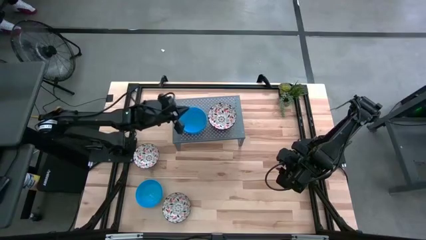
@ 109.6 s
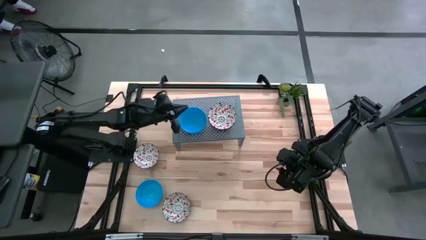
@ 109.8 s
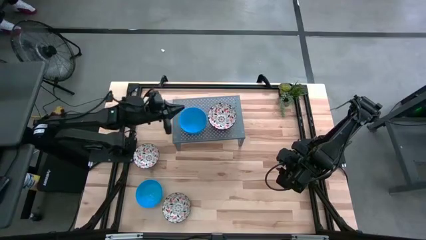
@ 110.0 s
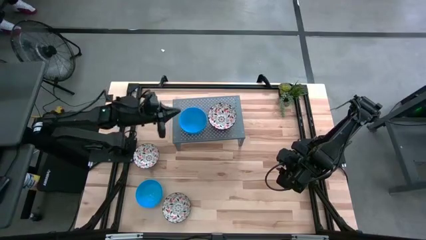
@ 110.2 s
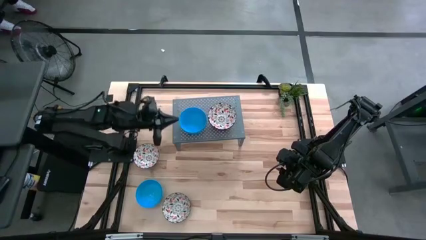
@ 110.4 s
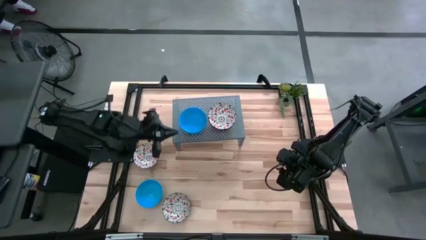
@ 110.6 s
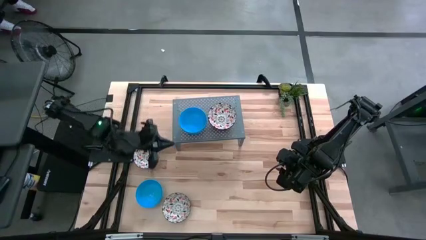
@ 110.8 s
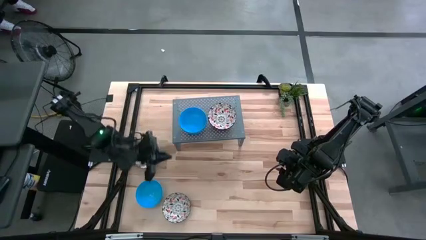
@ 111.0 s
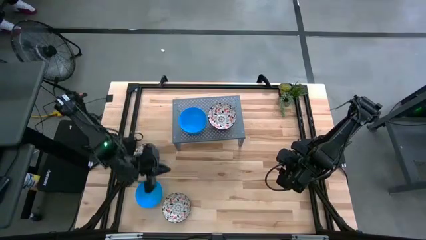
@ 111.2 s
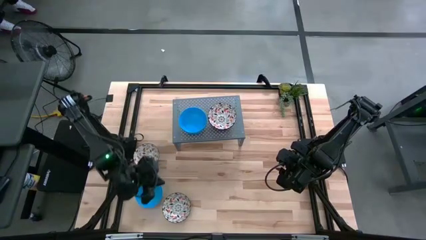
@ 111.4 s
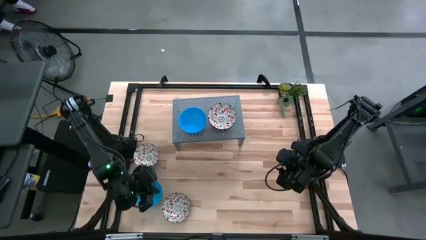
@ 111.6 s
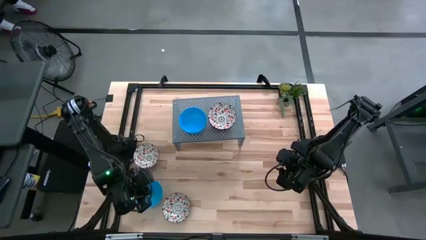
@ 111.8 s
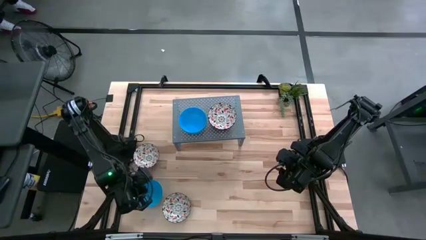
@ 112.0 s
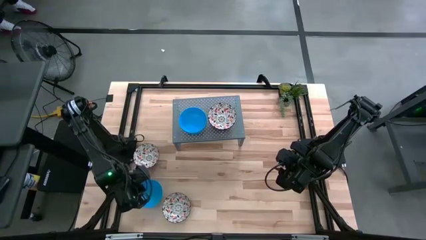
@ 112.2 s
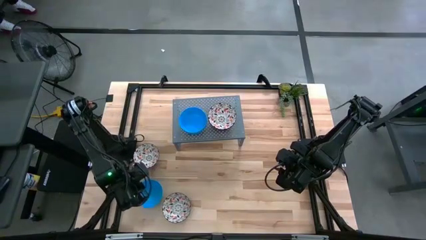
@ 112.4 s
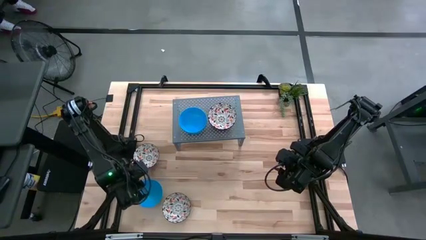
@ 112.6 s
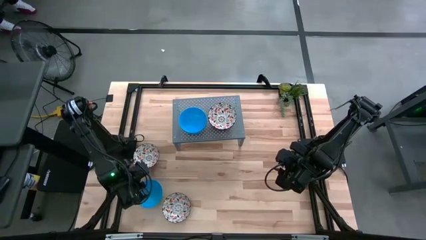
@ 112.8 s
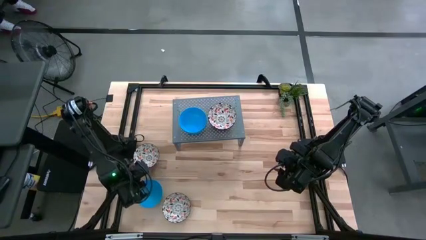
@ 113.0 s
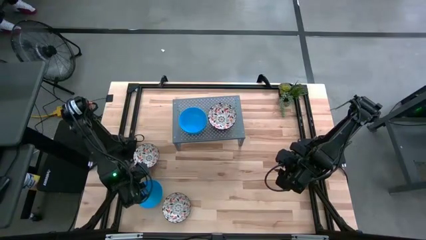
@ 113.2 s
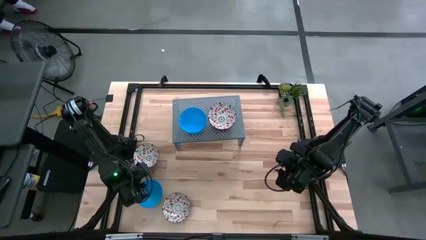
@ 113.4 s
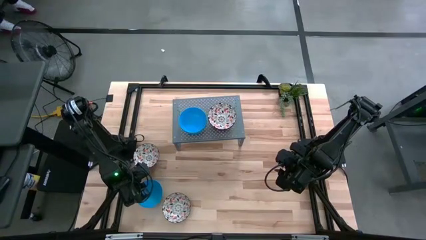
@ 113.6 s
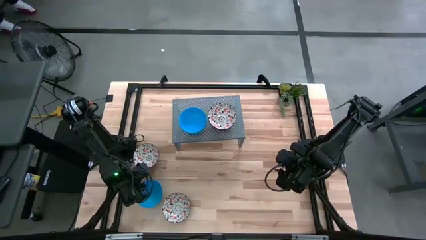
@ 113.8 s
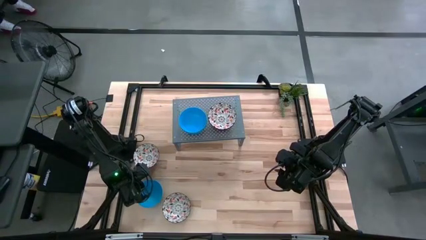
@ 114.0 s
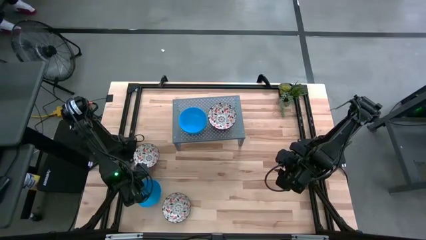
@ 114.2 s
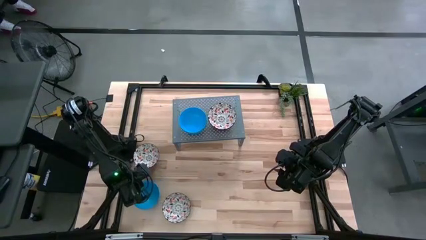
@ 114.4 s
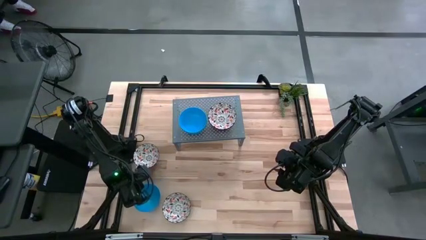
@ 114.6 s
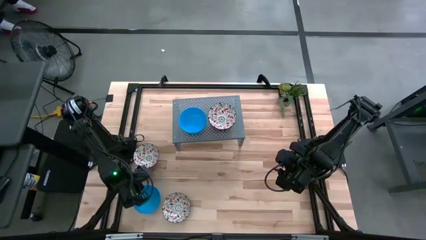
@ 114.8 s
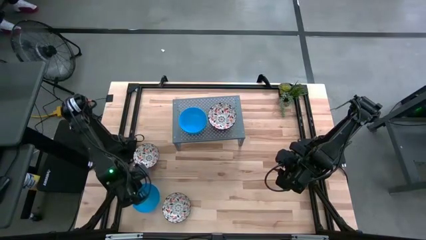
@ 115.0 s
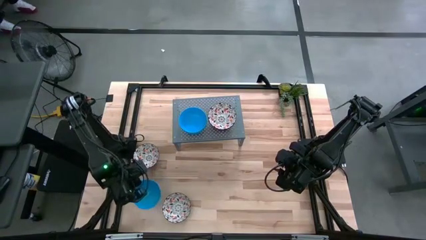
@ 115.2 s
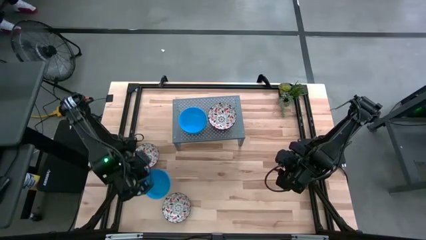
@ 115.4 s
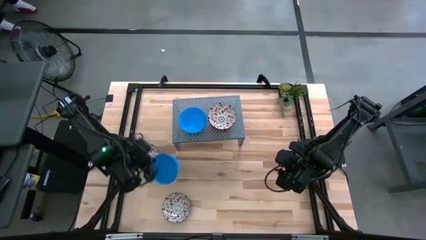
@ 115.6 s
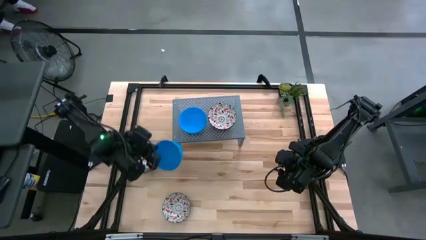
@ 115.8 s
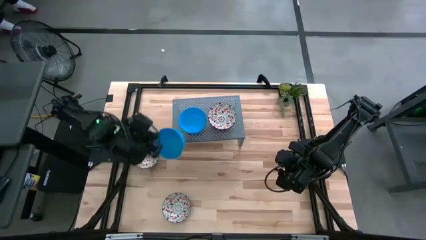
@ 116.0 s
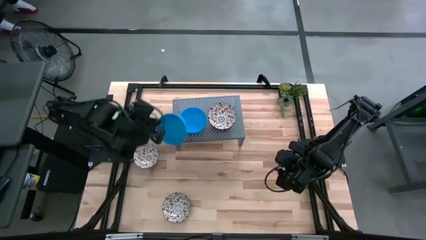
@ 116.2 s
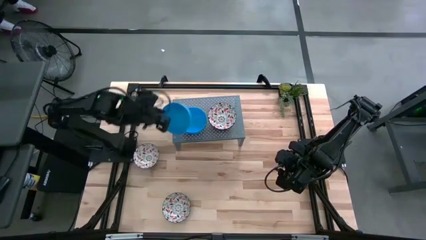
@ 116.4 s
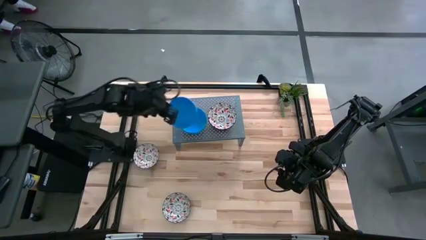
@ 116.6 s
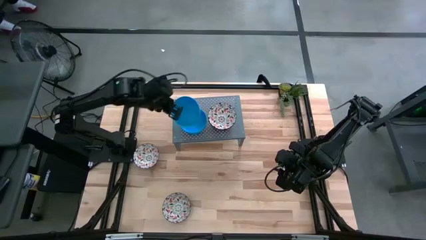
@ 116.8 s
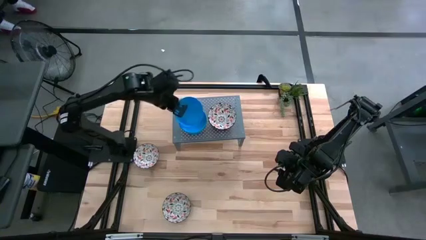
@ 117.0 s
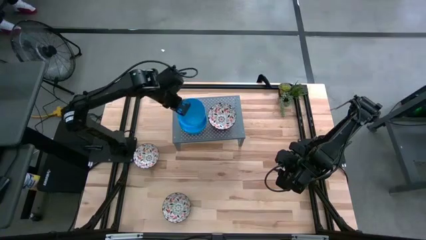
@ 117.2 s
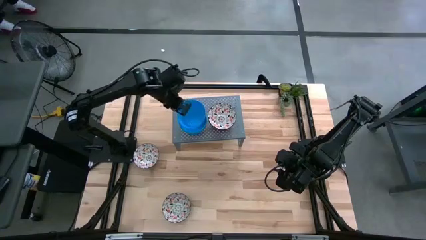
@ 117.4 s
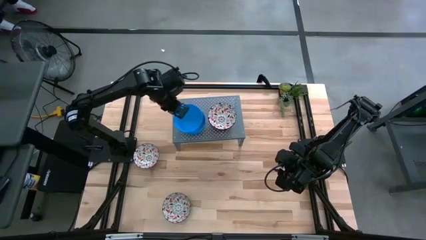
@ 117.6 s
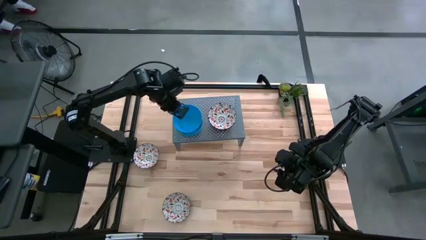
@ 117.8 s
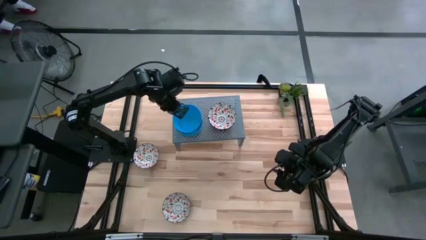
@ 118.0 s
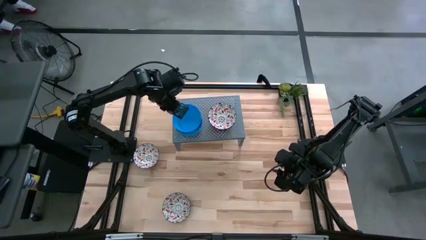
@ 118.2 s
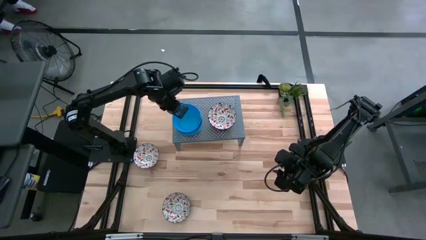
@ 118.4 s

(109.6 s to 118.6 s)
Task: Pick & Place Mini bowls
Stack the blue bowl on top of the blue bowls on the shelf

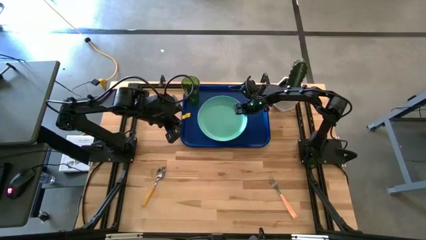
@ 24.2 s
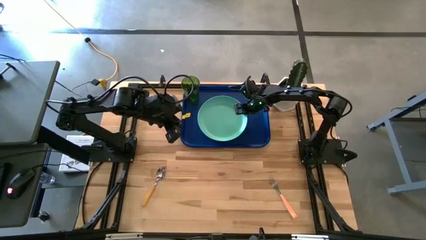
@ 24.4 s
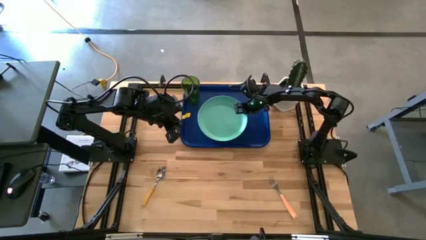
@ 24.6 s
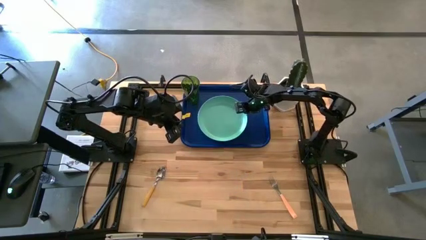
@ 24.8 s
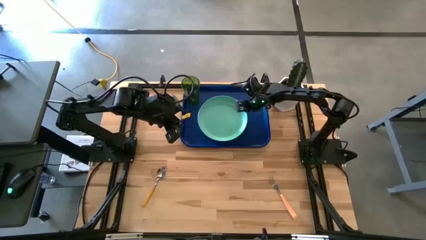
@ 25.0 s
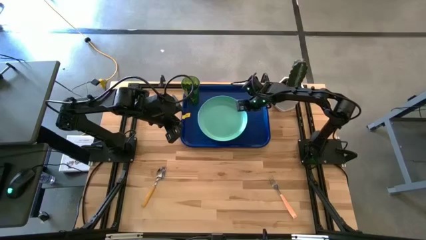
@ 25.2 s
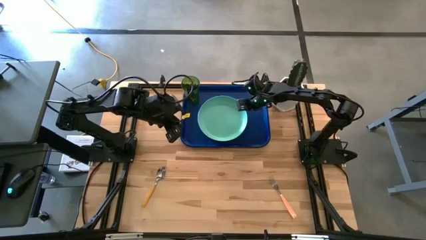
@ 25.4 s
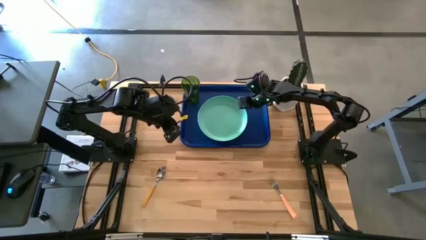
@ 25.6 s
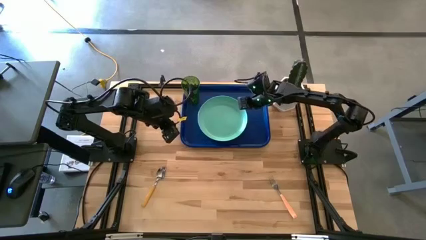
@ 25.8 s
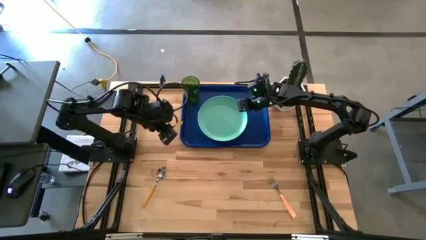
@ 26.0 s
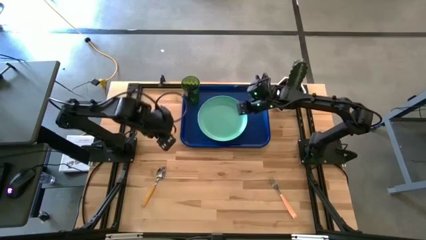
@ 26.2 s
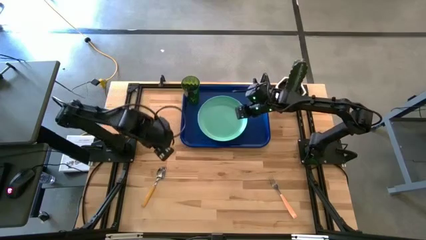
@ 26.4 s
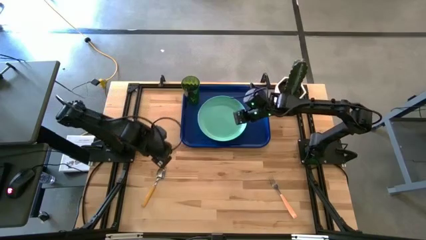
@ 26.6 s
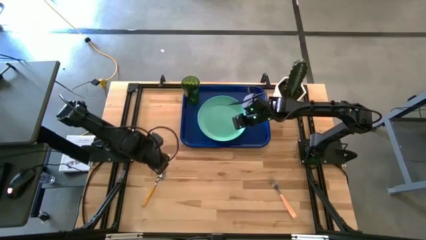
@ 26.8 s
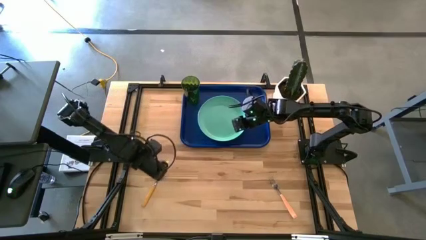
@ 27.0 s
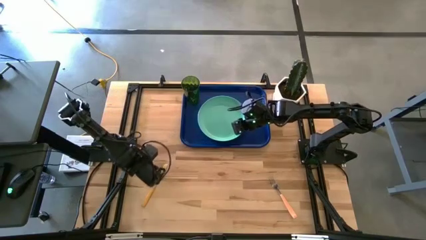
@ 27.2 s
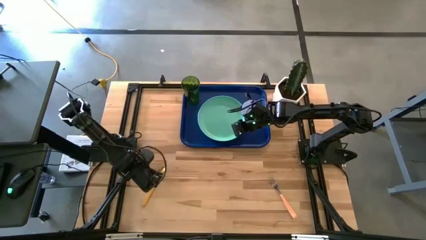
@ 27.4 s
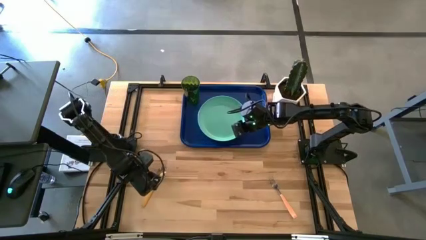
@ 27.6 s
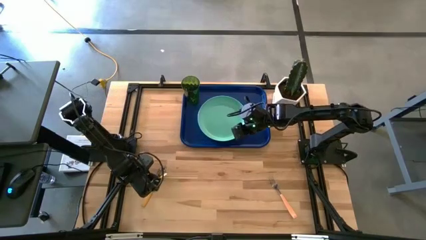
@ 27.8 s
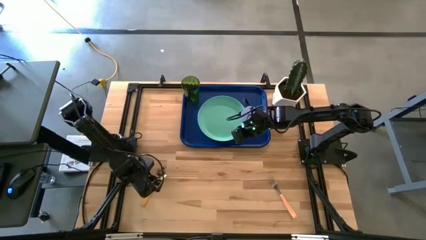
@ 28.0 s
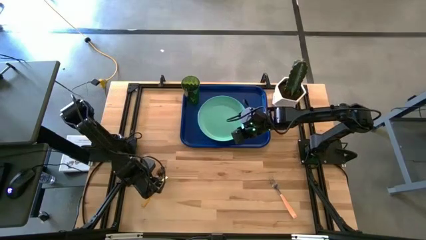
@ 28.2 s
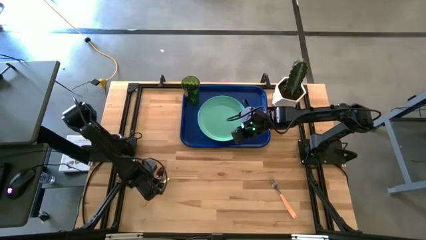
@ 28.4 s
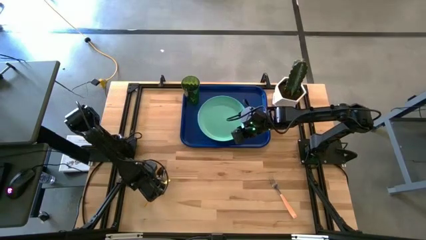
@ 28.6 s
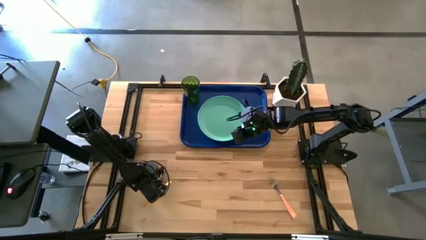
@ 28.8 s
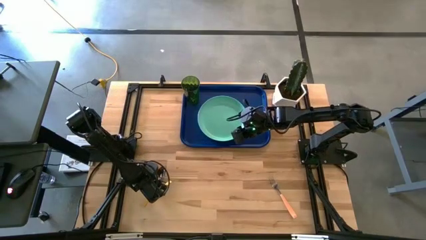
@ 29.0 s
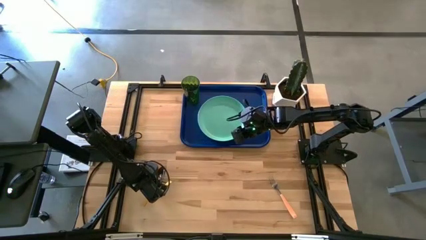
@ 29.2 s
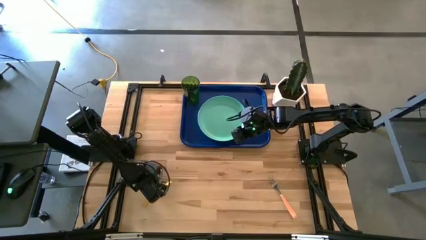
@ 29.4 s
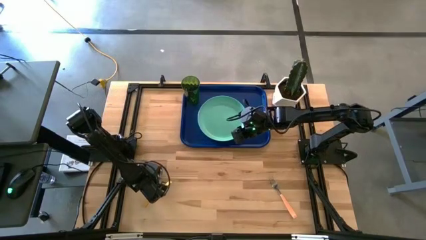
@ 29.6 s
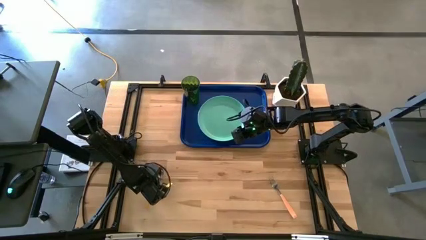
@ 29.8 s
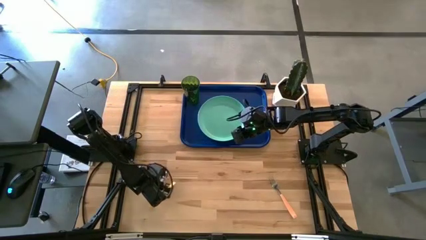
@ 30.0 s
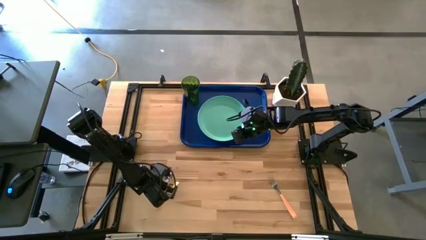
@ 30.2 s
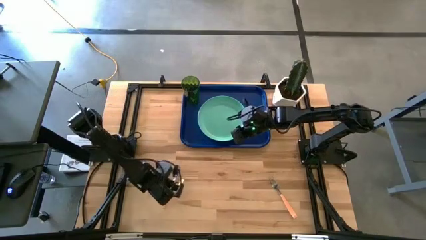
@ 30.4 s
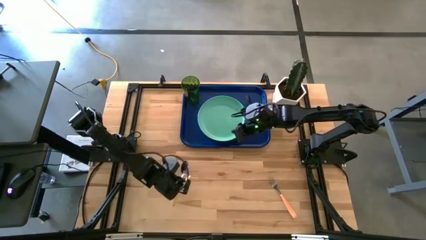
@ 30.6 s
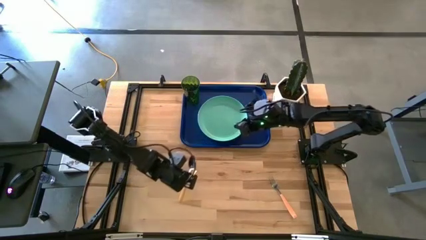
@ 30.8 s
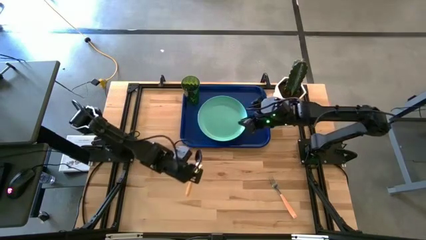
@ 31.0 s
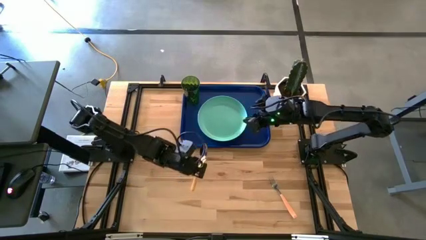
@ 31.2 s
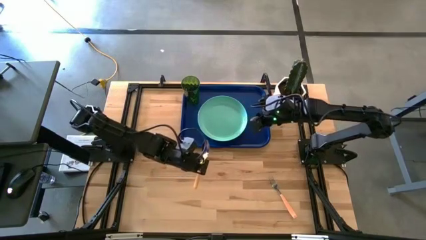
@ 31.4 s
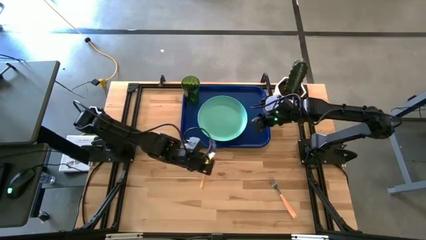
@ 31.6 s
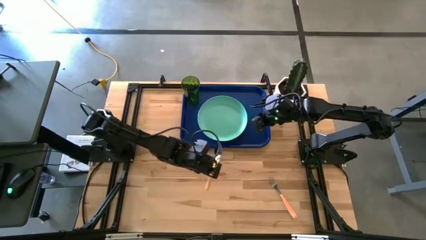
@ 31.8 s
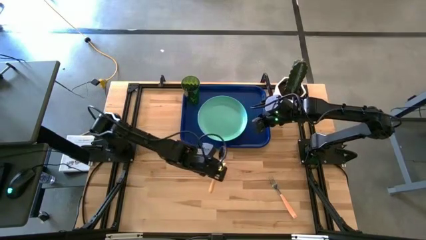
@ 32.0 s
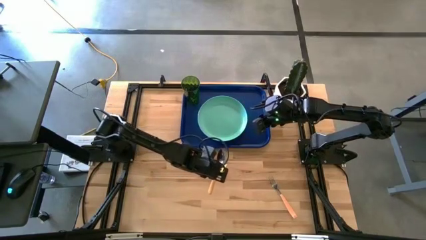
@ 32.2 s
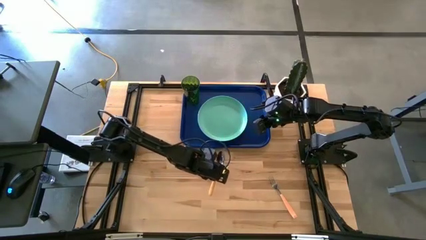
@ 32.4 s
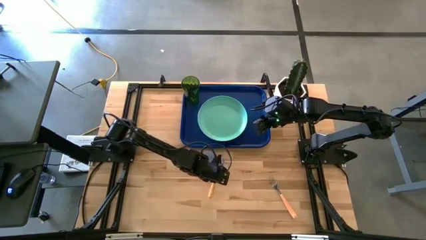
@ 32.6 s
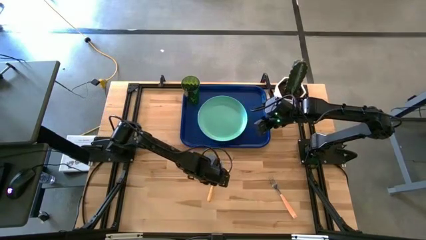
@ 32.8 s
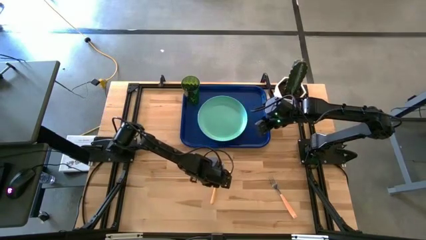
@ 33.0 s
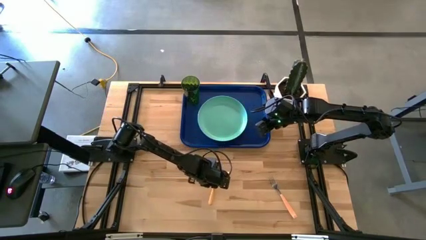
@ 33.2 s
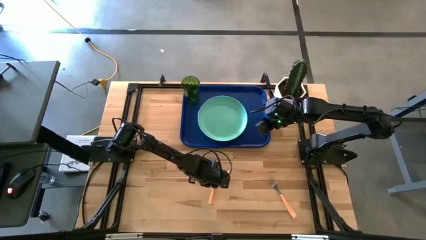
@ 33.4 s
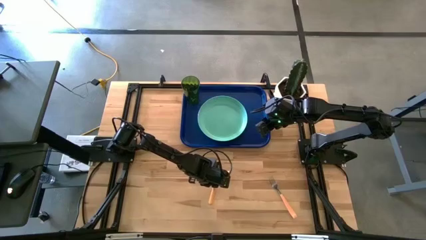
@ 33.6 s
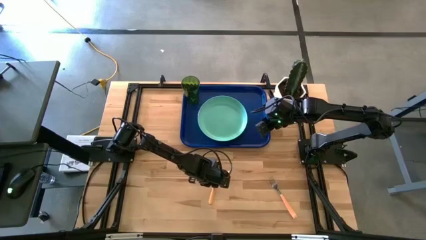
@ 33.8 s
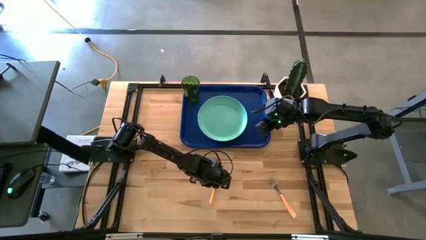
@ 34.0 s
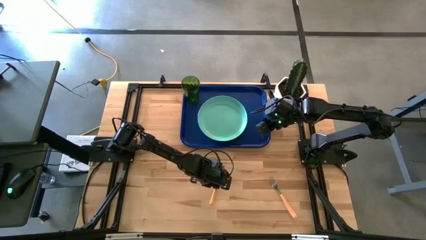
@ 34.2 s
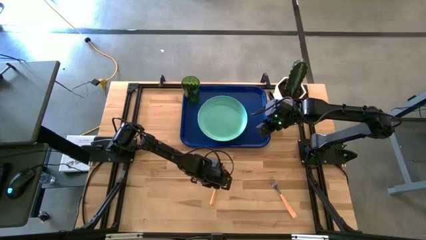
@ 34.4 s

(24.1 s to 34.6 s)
Task: Pick and place plate/cup/fork/spoon on tray
Put the yellow spoon on the blue serving tray
